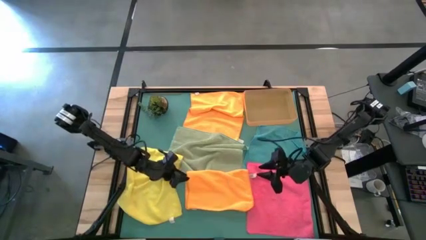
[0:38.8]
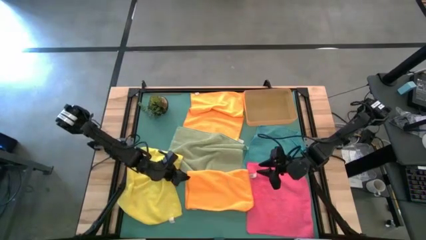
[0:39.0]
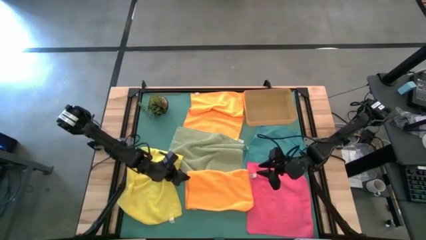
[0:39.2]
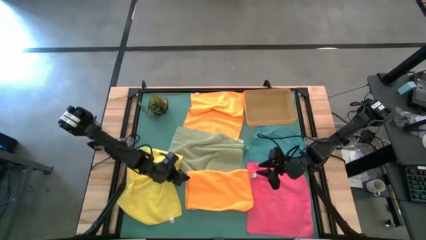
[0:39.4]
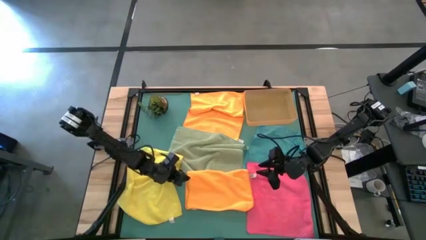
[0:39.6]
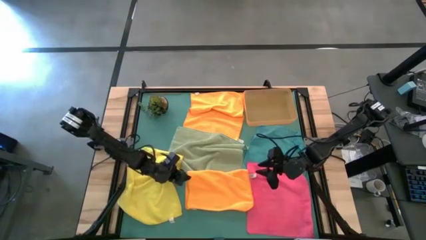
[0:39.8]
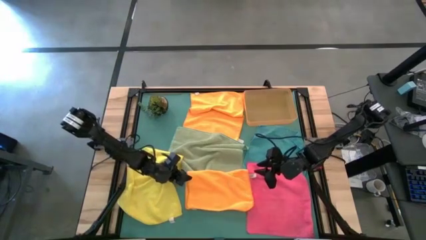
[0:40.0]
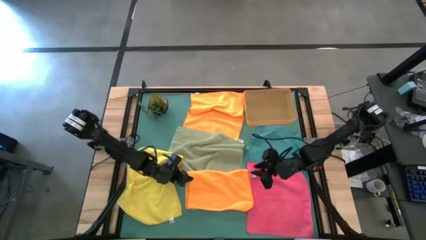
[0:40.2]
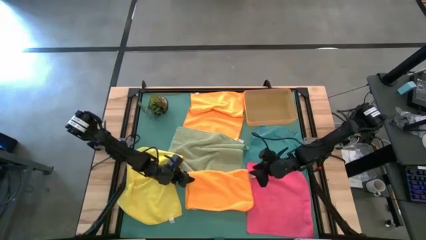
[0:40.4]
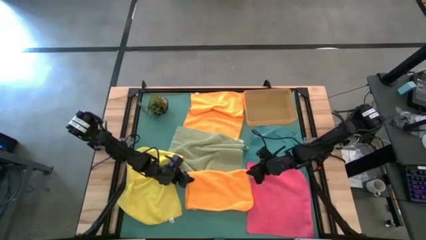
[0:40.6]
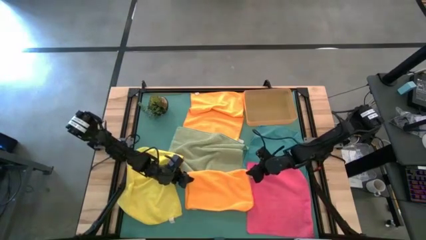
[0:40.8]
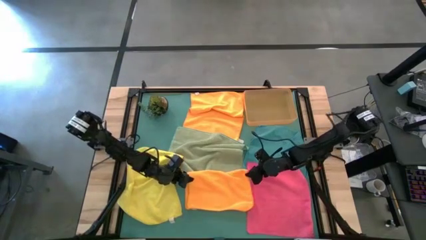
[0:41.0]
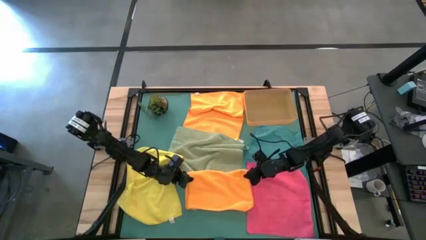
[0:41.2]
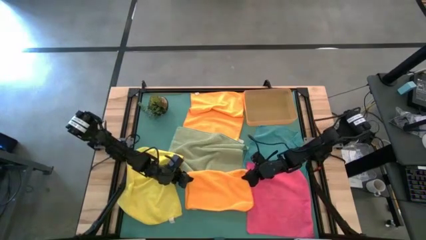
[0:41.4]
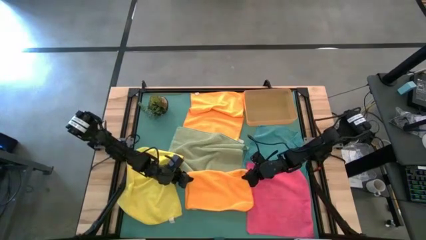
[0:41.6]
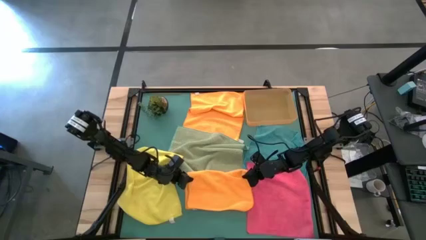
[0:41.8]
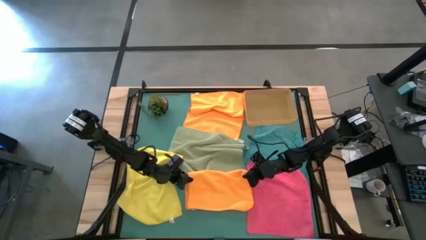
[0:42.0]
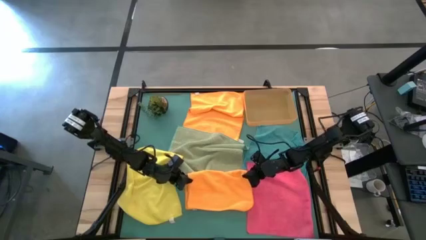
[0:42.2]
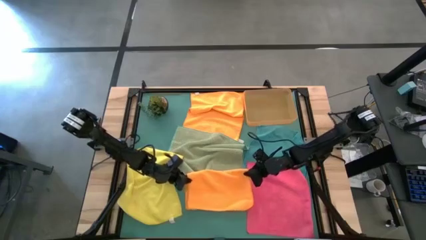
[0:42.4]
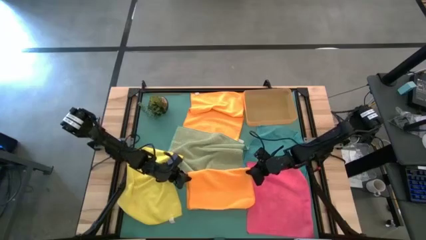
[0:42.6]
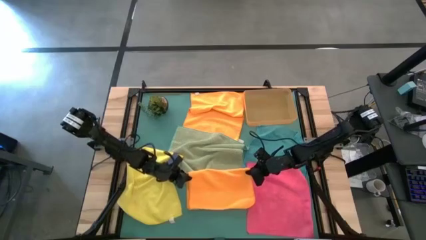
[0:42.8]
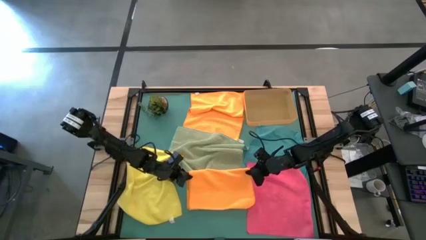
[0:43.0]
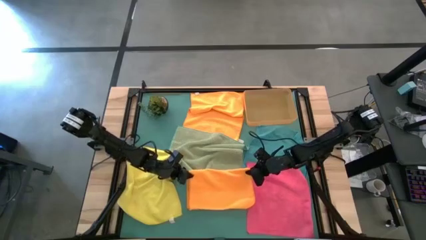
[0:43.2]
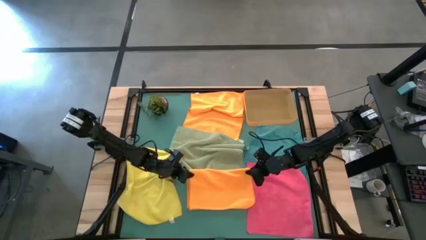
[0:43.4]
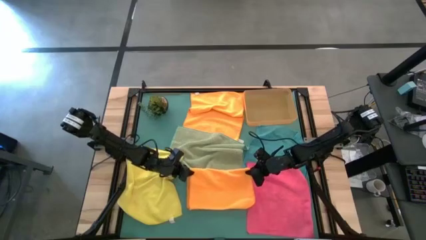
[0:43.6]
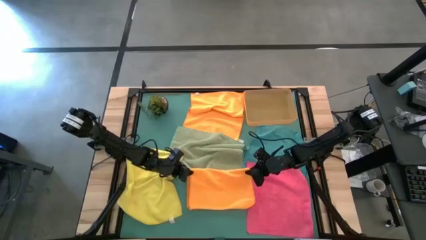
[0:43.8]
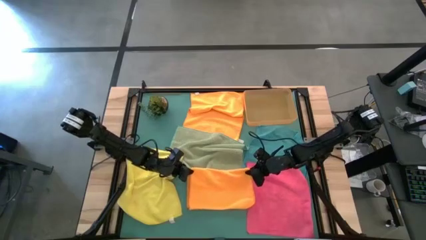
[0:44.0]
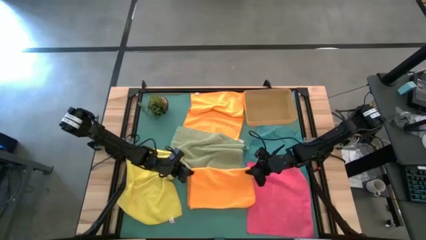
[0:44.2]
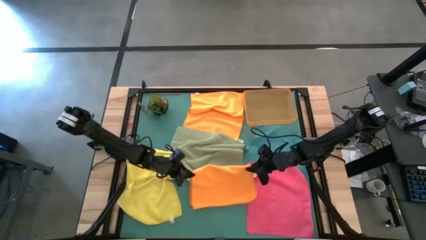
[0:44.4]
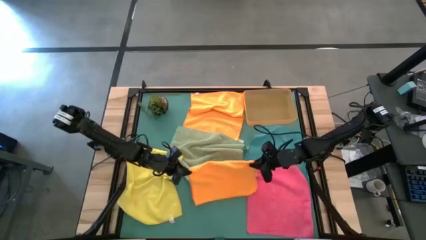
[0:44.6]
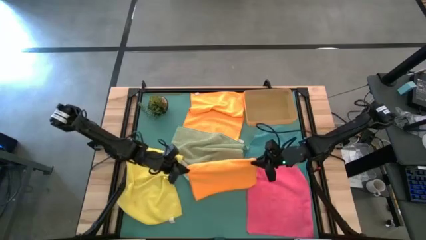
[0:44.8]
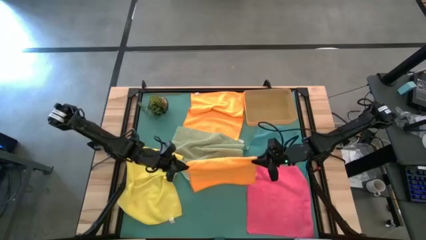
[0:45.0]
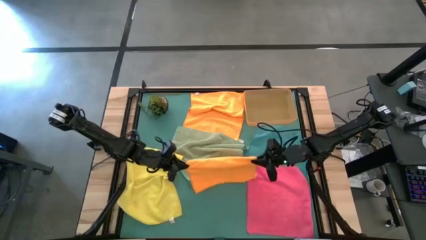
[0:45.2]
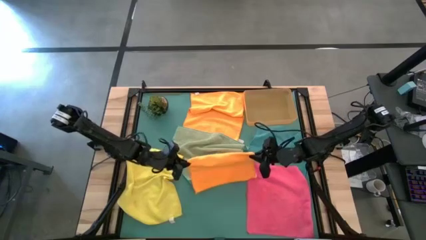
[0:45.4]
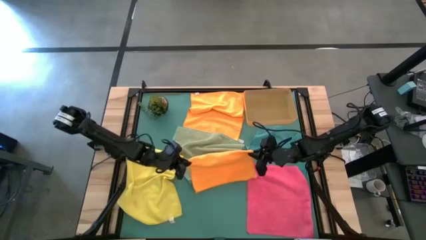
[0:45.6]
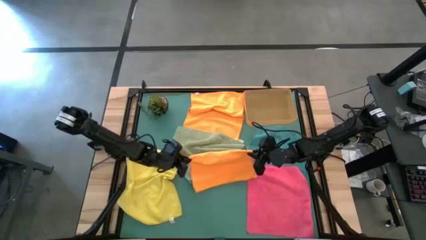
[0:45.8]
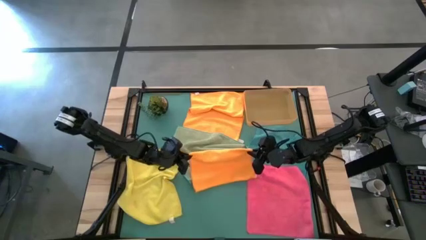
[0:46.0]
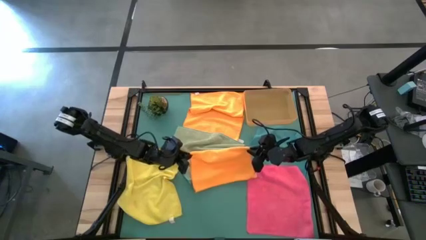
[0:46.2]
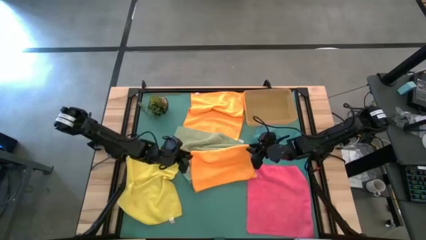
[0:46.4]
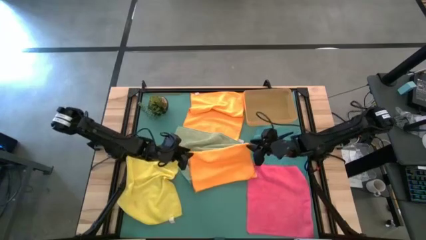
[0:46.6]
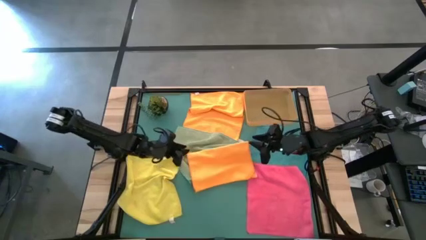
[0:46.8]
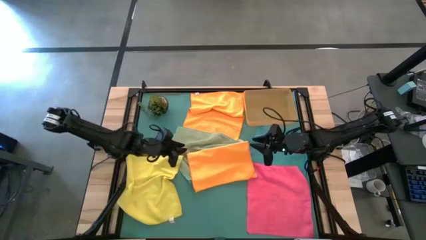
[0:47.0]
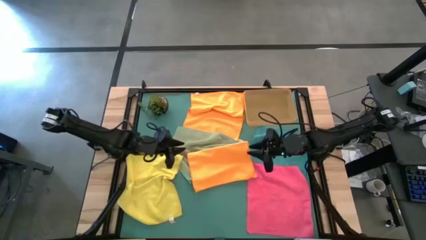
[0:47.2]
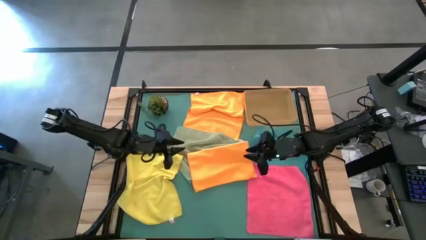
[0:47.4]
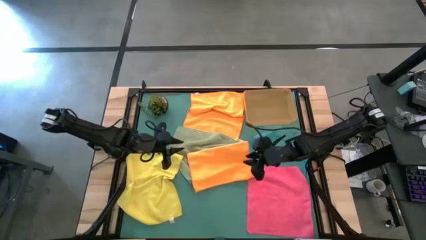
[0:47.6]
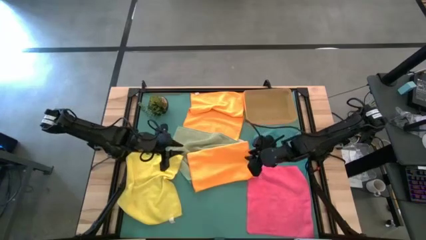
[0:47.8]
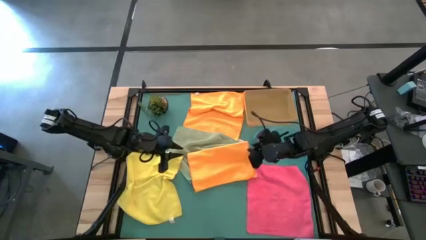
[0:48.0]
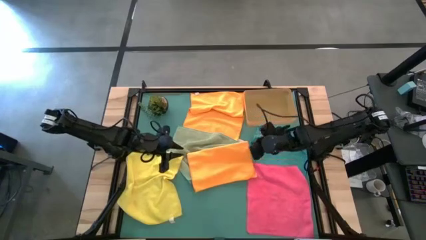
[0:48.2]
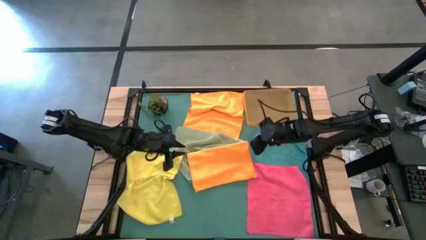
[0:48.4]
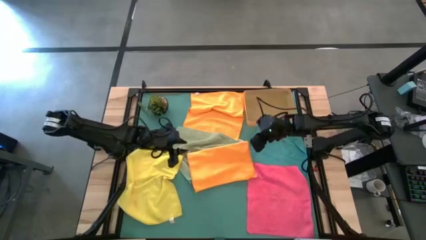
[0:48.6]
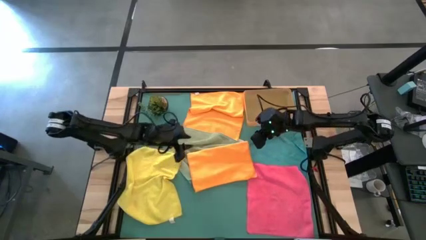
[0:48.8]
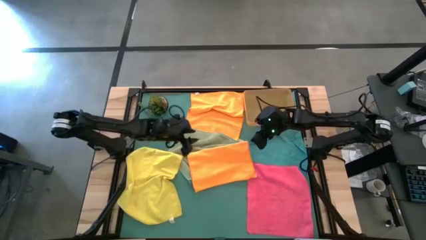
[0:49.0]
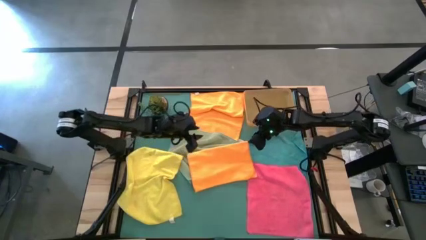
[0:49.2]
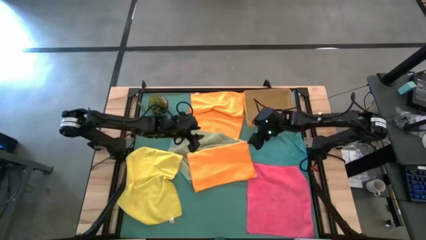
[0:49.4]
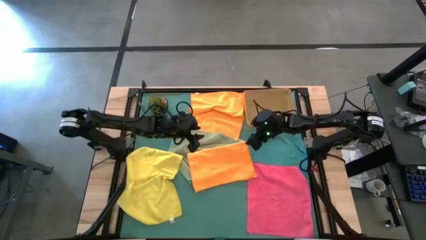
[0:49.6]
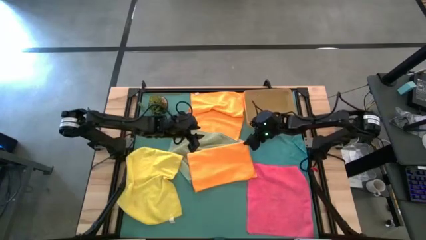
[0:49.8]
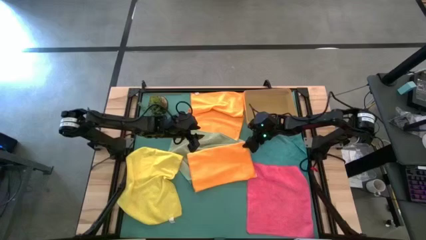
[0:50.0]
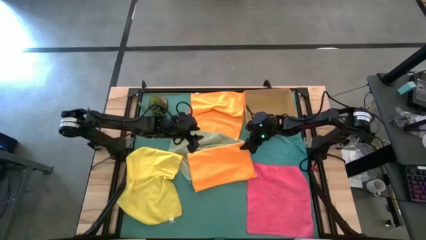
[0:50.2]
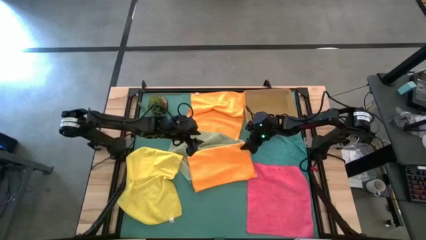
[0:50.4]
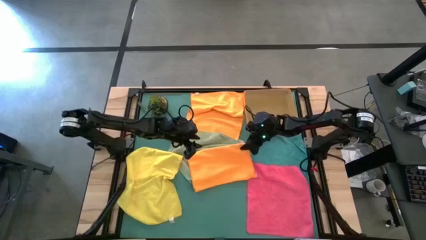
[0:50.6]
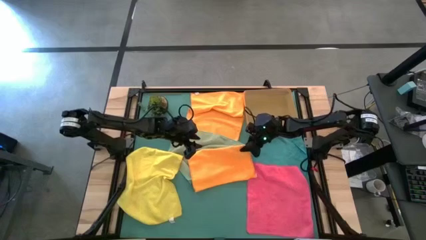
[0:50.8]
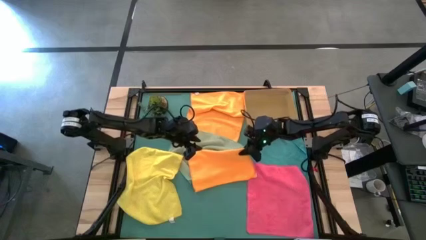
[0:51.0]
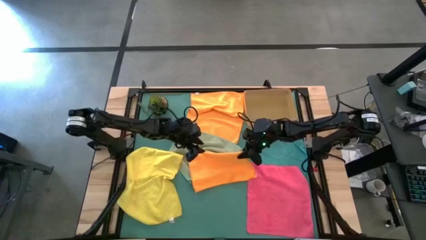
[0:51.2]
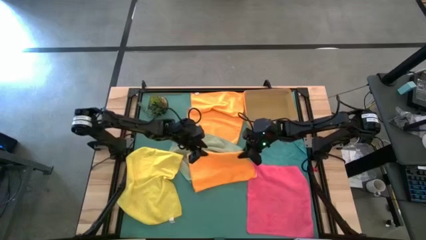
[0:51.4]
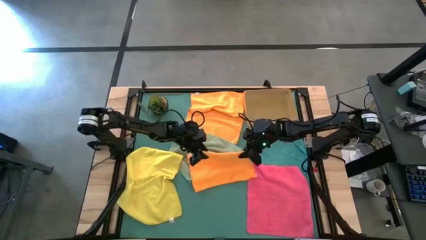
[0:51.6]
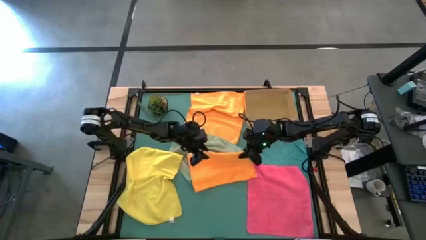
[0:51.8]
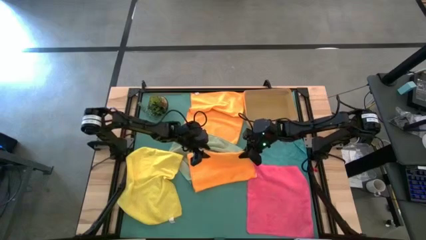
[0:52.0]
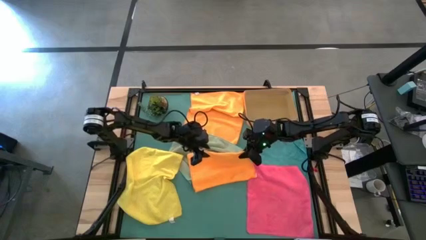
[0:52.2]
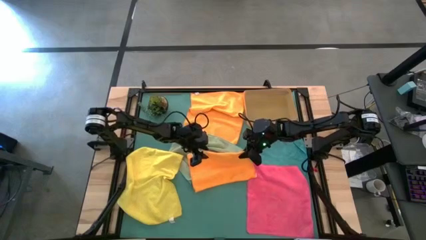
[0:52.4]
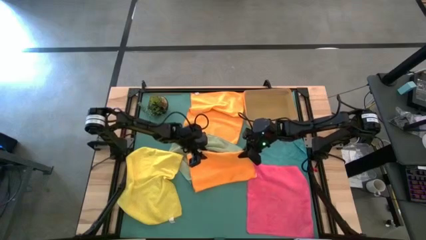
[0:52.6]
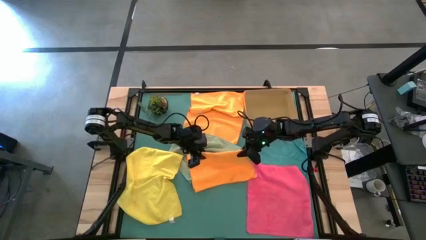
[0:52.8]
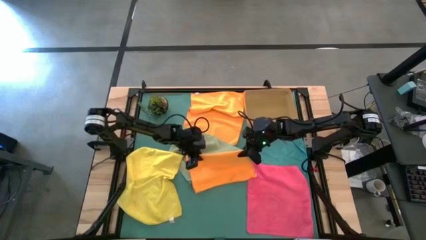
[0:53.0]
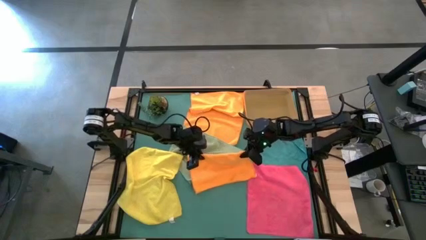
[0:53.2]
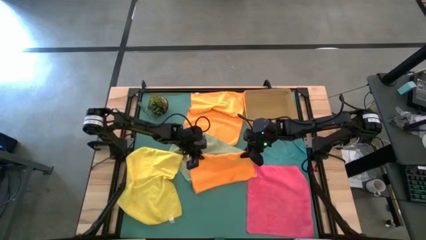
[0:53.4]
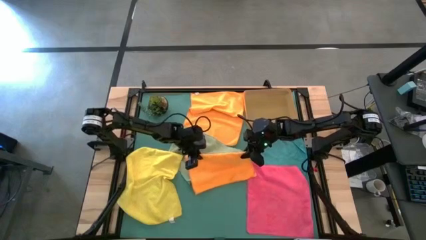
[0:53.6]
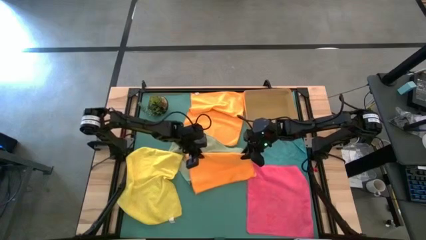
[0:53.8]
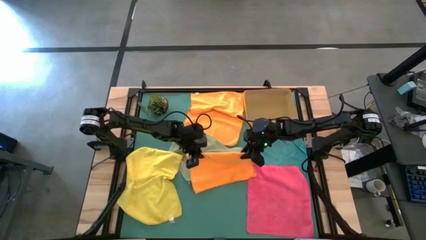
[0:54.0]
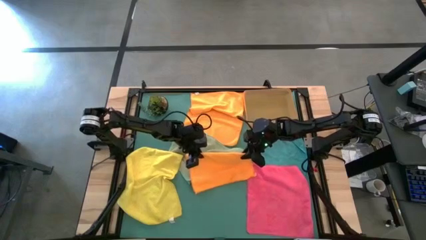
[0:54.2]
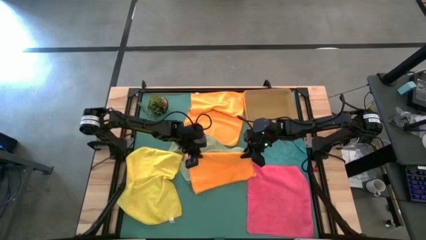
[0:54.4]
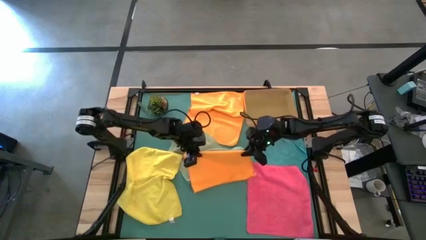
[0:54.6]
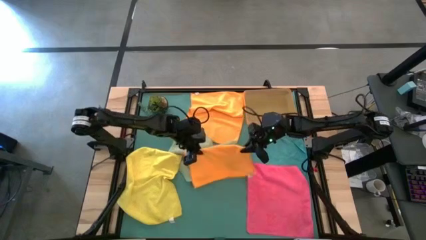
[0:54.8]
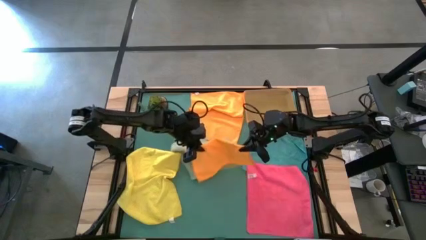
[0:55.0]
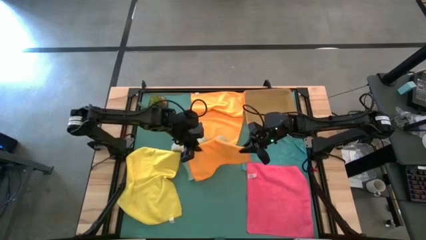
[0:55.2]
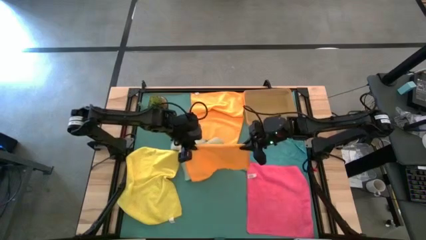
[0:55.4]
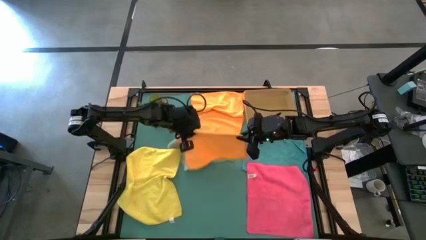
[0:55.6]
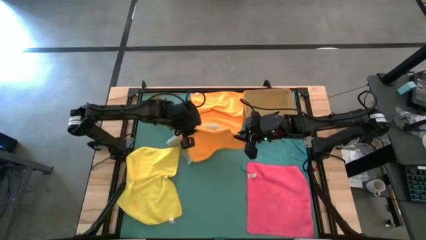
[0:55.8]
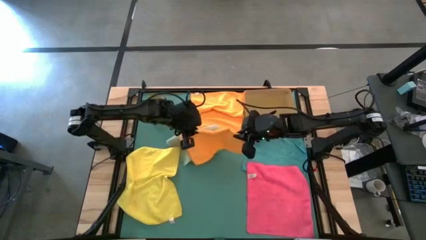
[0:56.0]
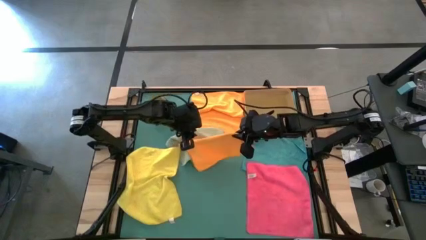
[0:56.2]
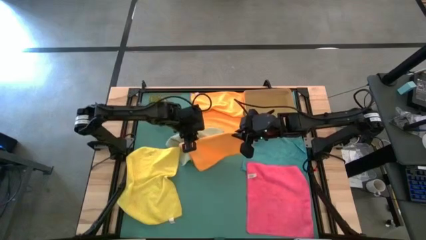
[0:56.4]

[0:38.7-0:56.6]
Task: Fold microfiber towels
Fold the bottom orange towel
